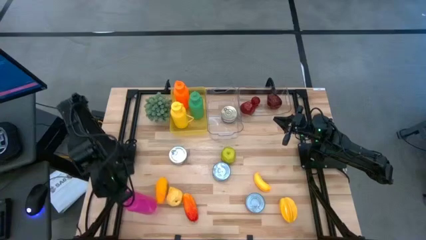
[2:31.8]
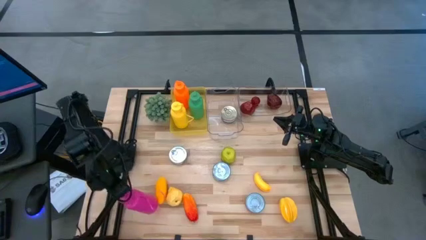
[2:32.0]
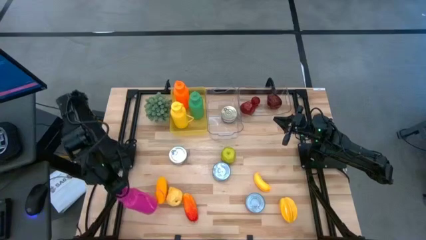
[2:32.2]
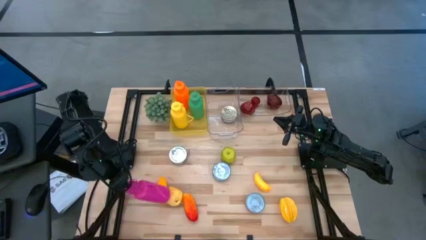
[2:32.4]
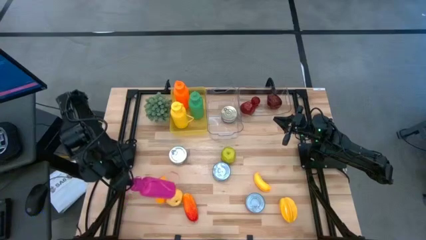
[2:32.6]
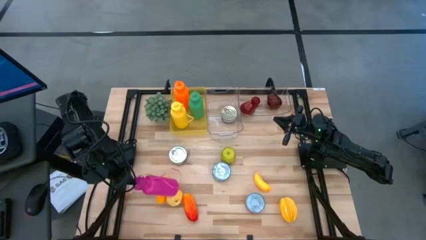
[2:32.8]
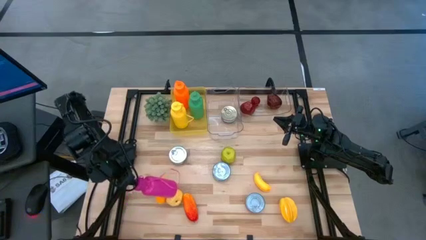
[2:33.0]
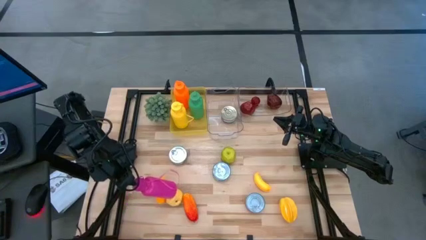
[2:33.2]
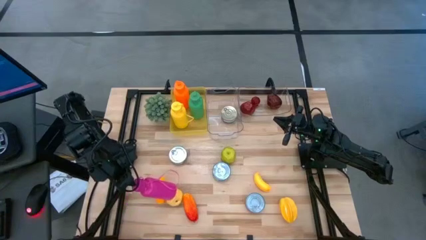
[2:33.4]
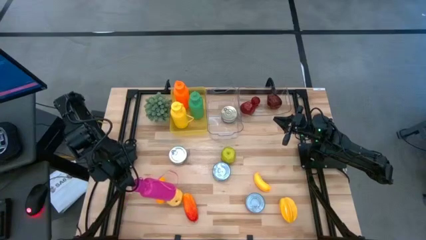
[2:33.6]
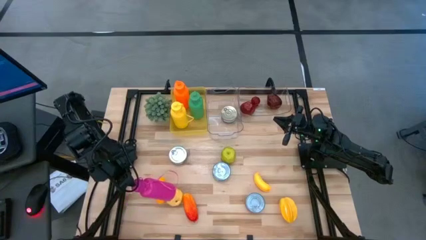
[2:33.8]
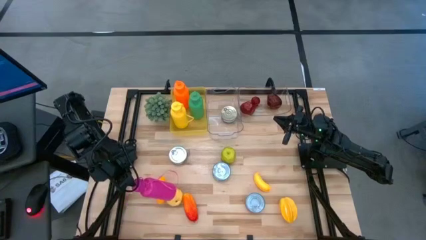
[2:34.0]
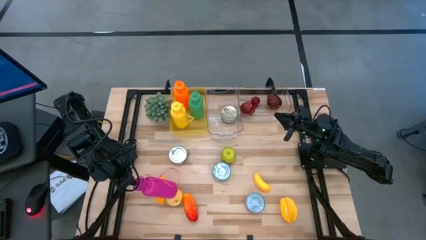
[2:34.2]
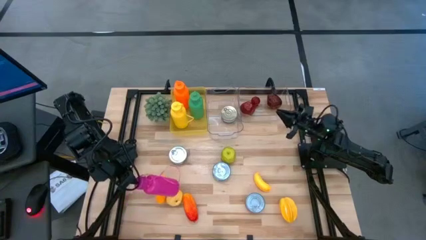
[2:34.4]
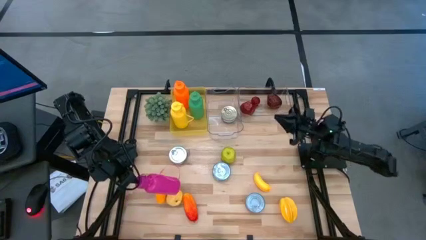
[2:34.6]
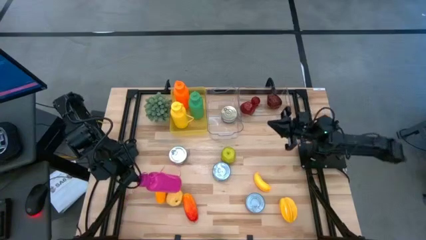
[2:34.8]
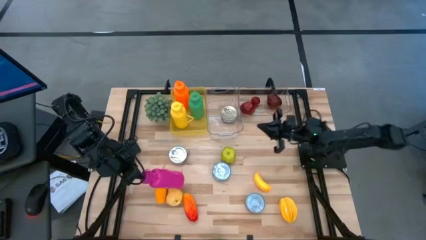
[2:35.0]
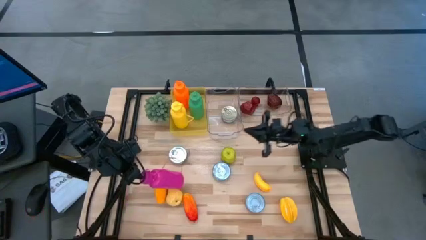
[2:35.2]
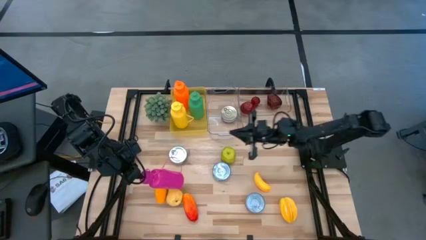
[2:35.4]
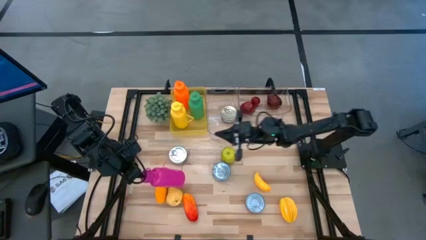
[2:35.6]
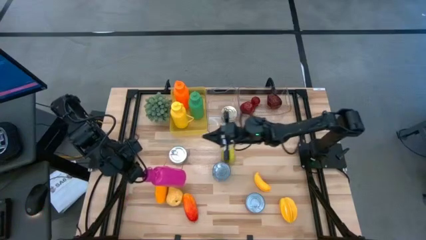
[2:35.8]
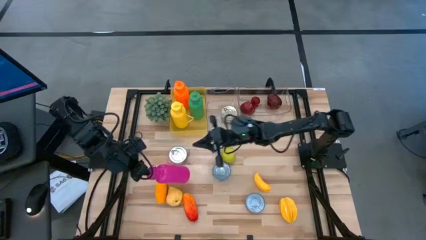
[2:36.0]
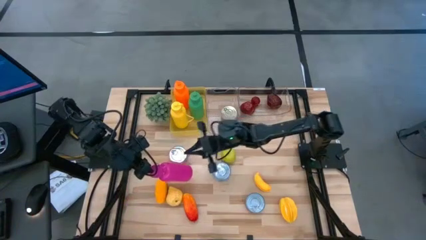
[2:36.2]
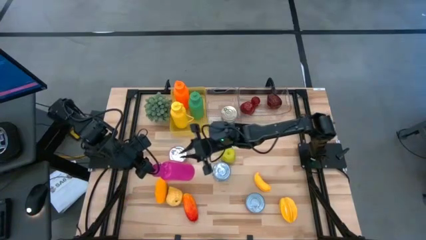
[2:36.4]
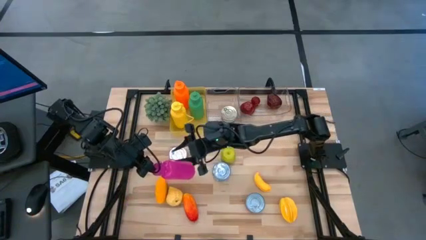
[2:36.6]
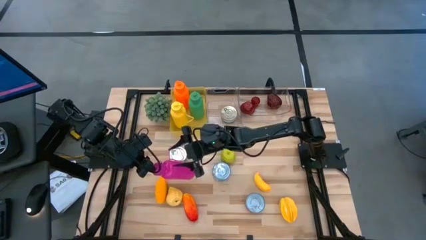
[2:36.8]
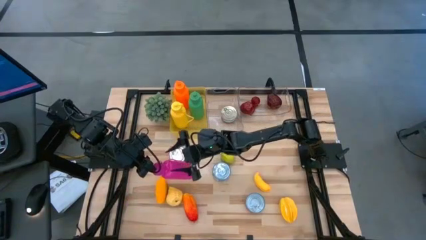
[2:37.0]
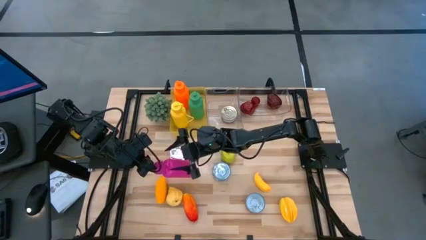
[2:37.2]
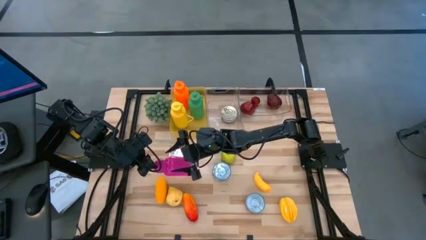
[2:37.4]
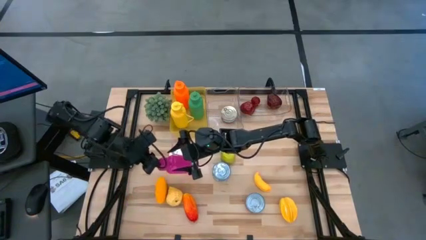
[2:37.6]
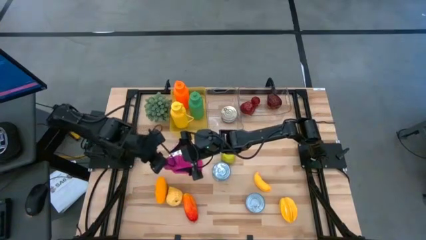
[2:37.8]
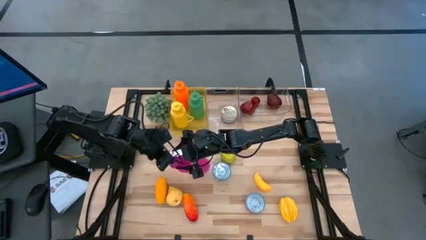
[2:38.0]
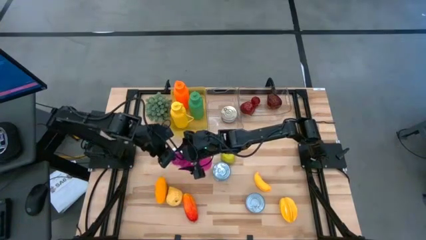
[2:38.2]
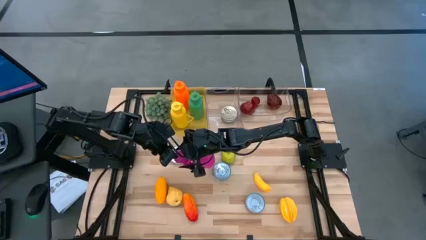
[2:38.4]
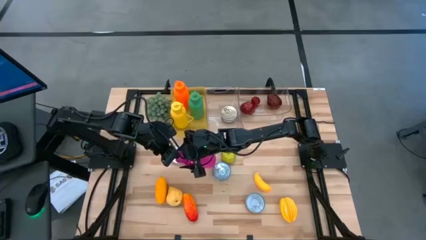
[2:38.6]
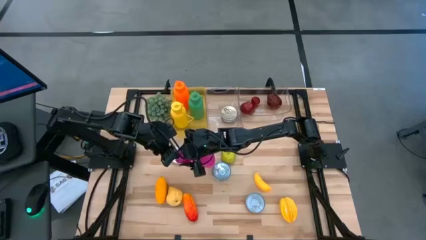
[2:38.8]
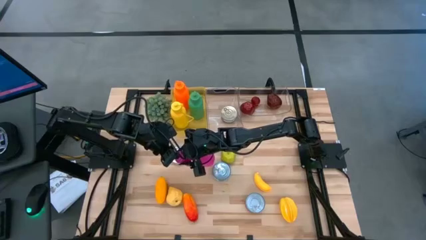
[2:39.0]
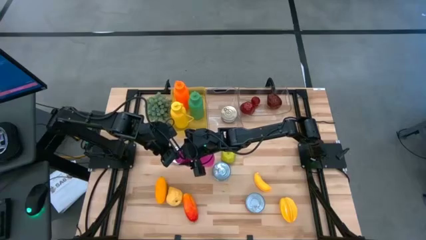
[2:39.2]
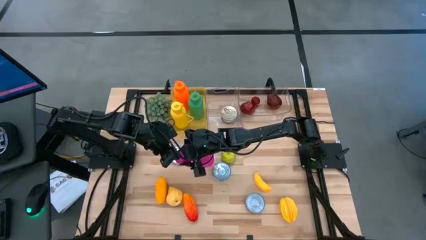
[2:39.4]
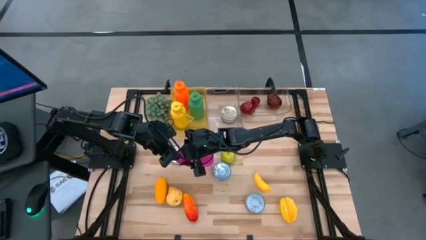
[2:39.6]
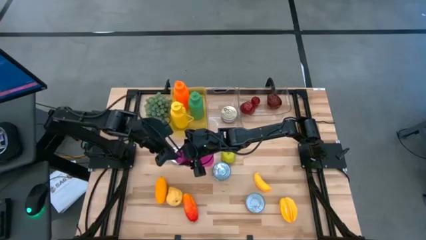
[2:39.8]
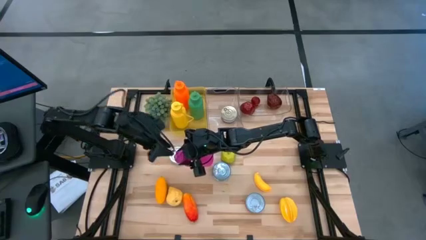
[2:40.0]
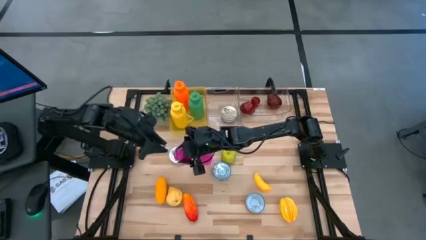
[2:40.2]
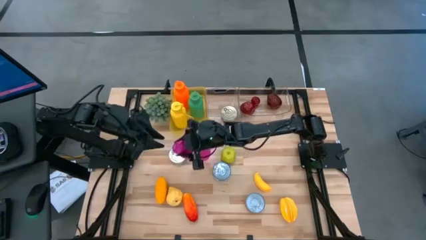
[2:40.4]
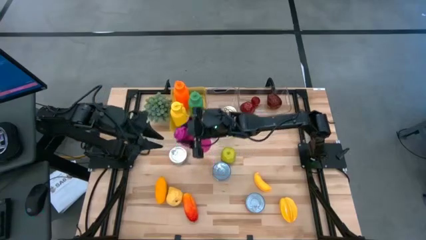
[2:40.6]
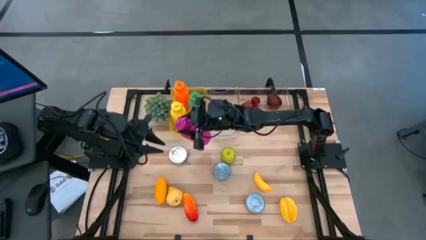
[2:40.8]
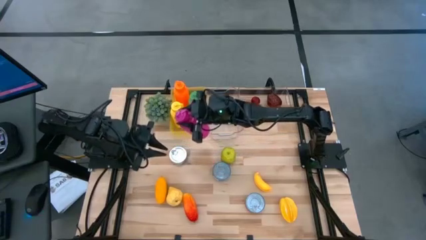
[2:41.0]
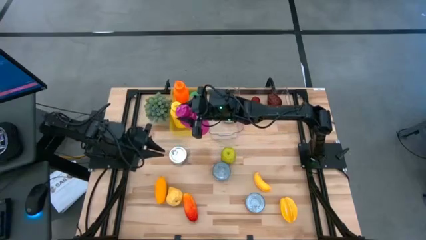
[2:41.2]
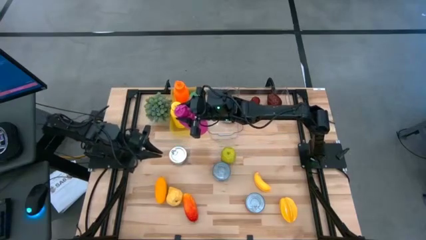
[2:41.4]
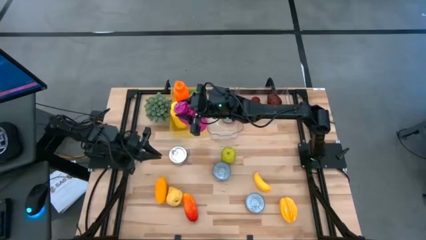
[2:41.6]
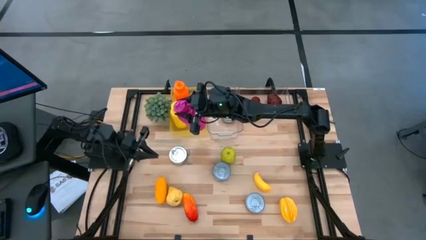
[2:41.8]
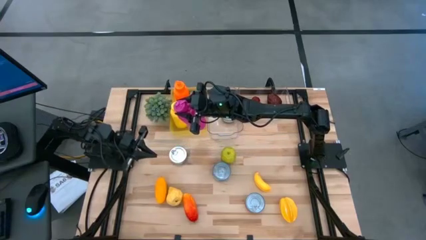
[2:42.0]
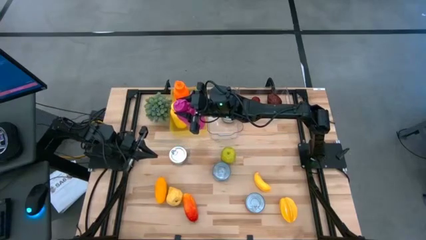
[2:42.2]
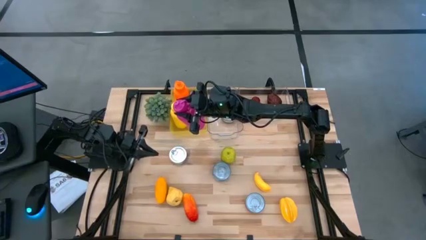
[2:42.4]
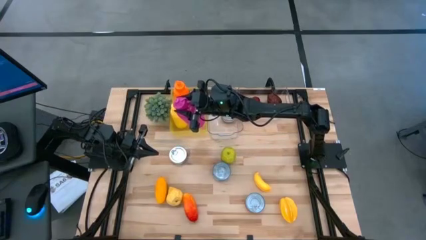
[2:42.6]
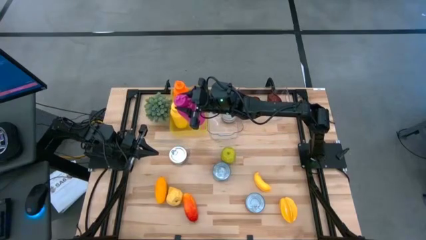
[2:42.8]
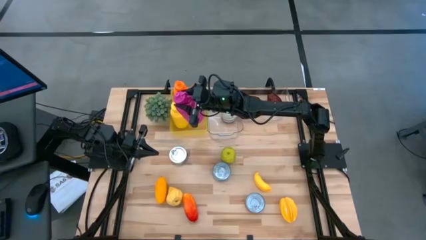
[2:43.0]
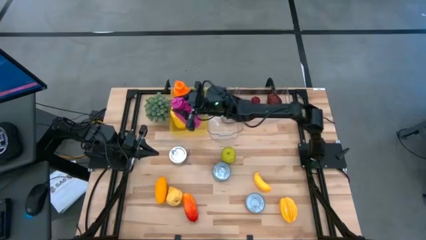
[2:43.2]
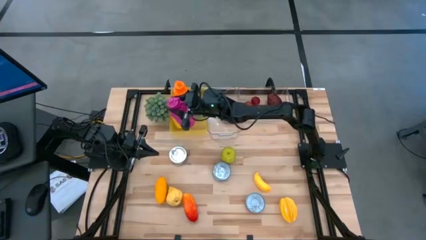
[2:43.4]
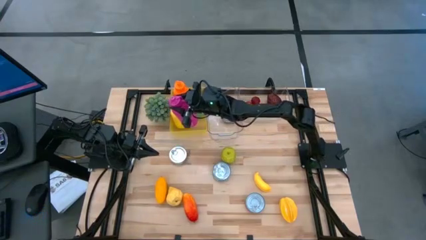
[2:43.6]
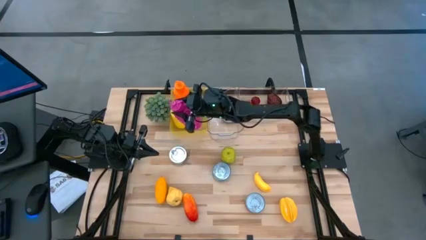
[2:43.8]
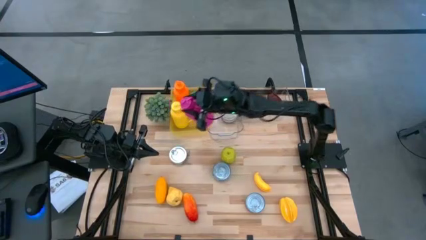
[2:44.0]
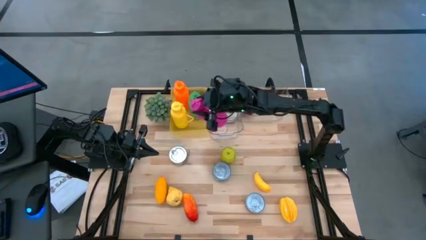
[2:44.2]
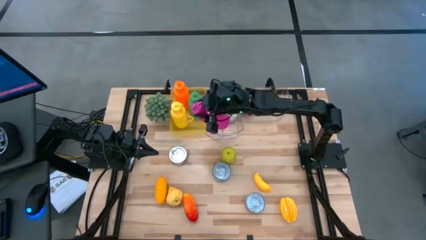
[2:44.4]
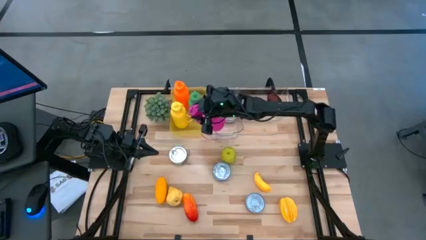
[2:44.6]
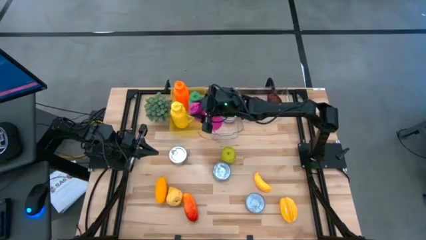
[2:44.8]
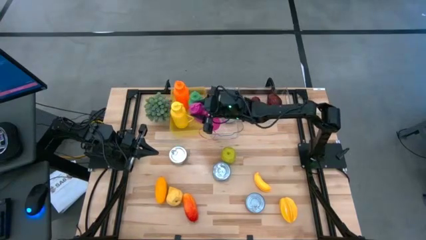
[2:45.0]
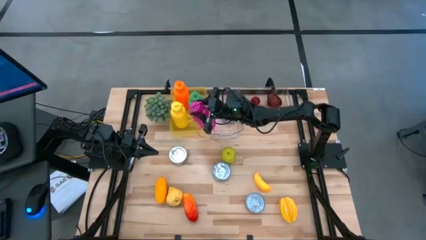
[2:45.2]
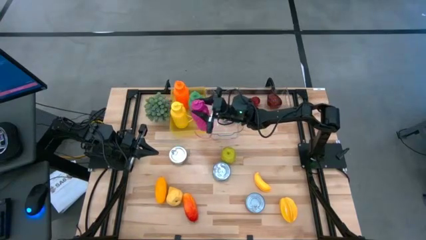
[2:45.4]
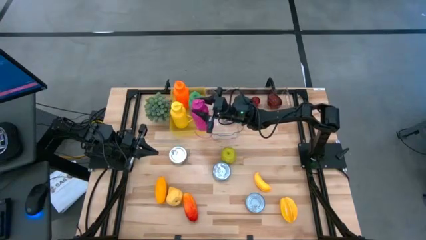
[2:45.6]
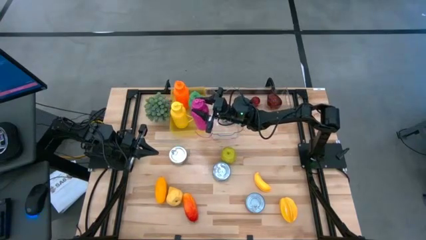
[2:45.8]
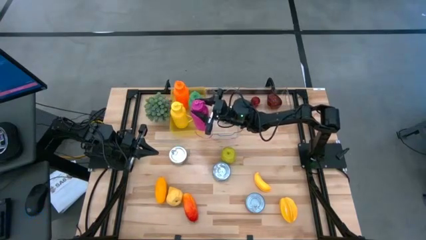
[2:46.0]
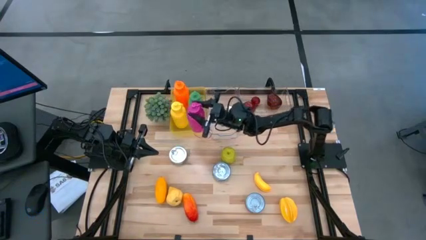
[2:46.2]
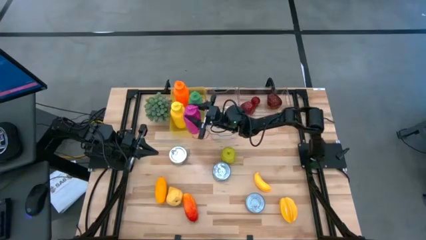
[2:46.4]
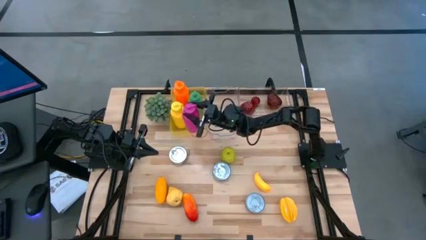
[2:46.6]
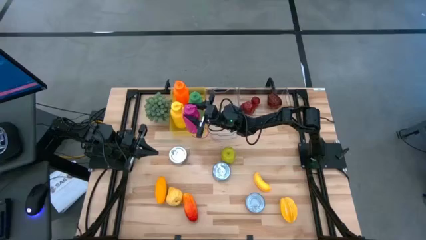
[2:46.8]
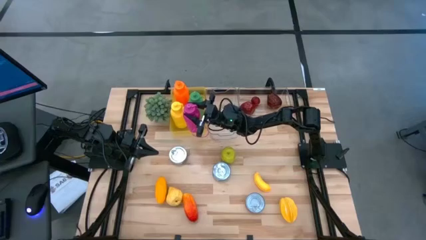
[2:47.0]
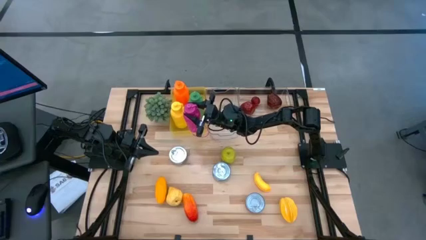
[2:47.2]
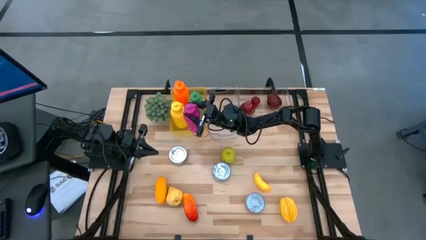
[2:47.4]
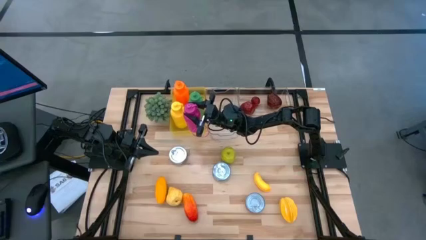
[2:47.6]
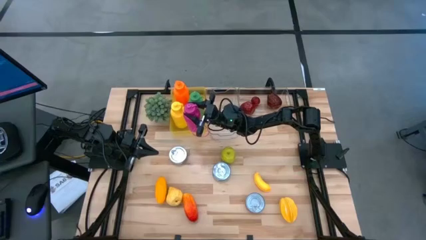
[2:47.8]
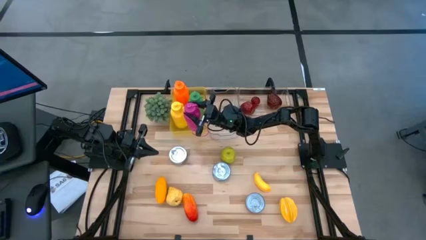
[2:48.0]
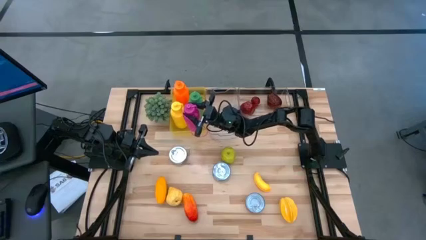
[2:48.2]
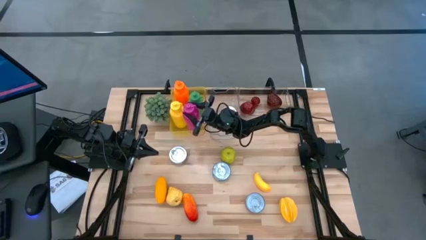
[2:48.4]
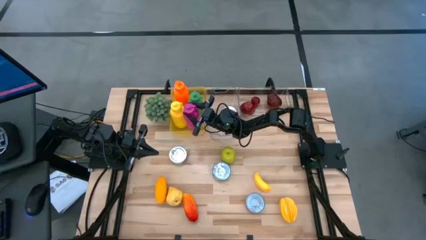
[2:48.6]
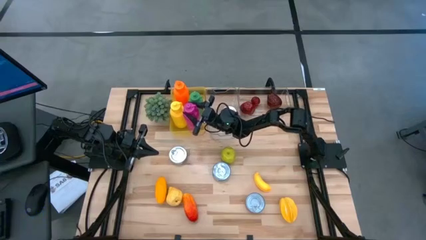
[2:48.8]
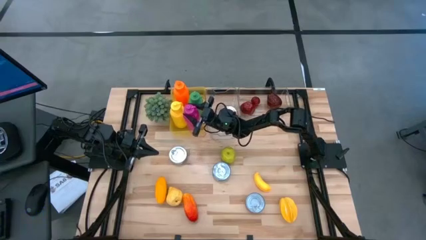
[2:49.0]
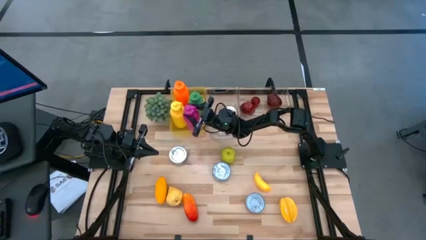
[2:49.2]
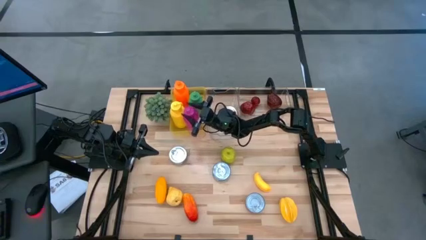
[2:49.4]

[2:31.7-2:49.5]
Task: Pick & Place Food Item
Put the pink bottle into the yellow bin
